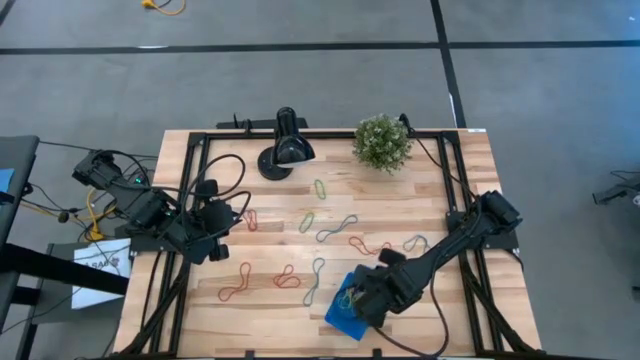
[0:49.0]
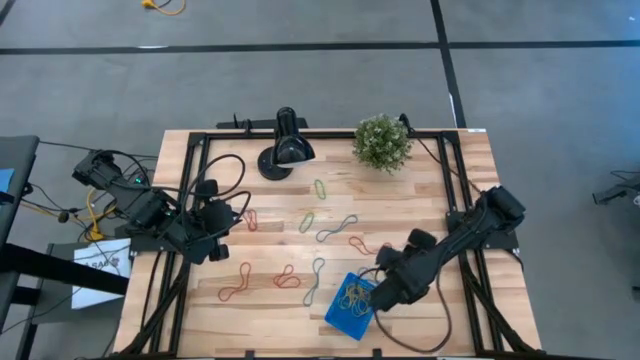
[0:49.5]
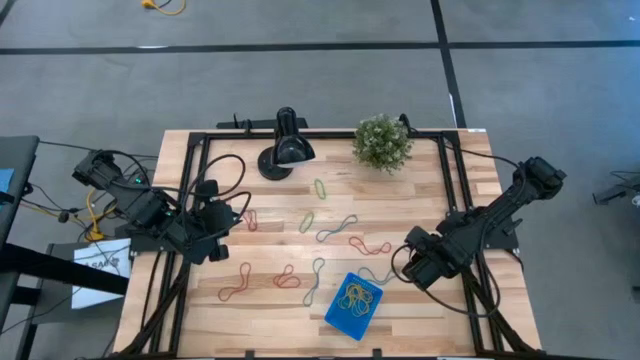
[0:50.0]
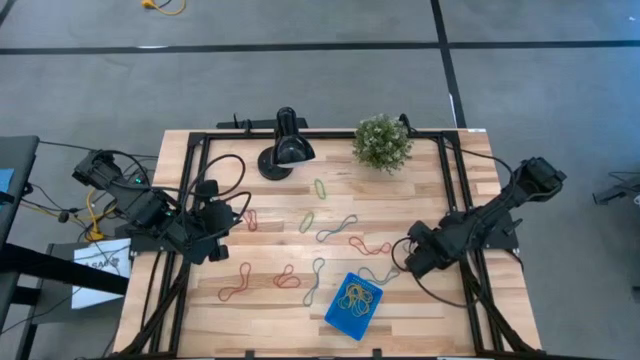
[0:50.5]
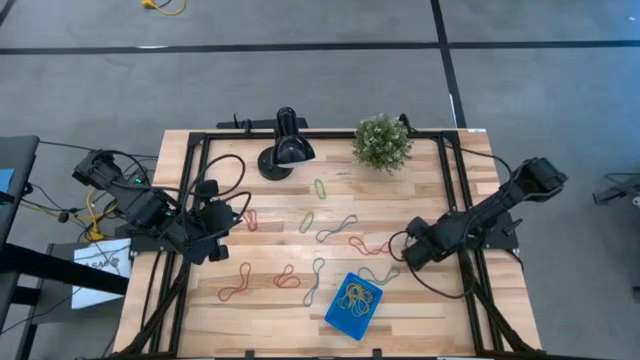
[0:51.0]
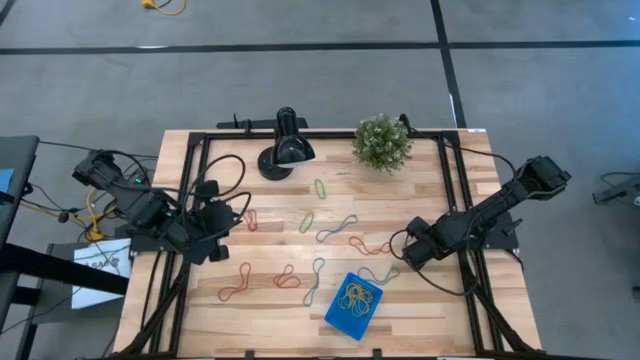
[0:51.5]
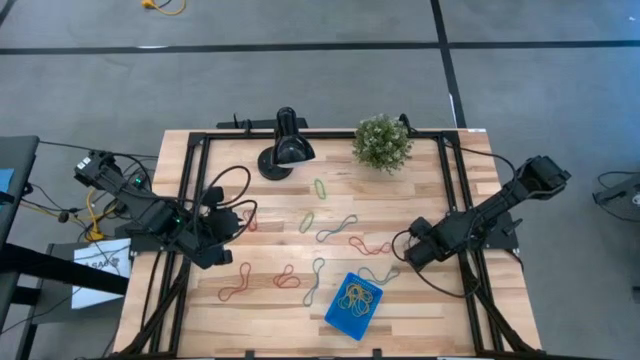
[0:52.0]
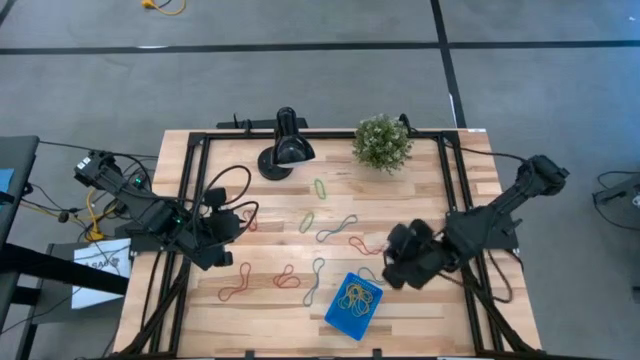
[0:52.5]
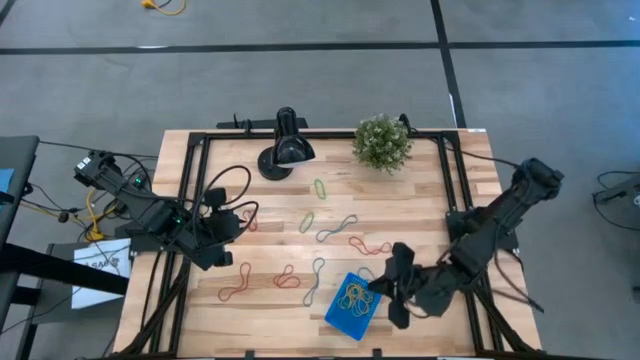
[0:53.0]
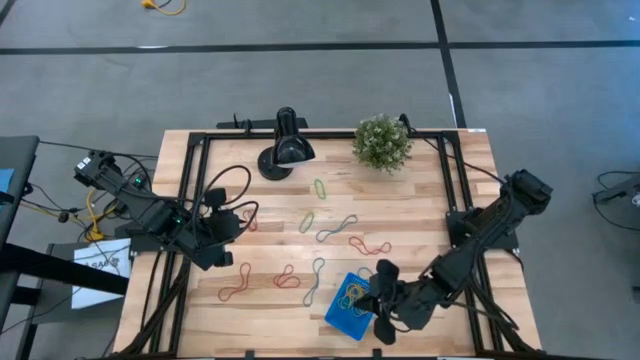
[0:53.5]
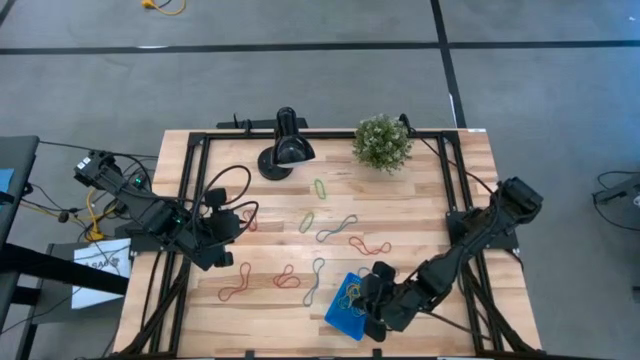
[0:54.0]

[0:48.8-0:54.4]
Task: Pick and place items into bin
Put the blue rubber band into the blue bin

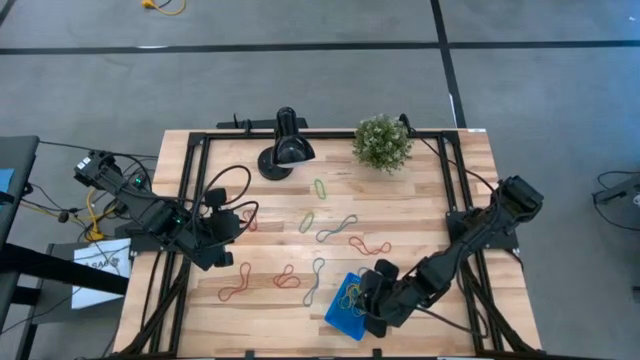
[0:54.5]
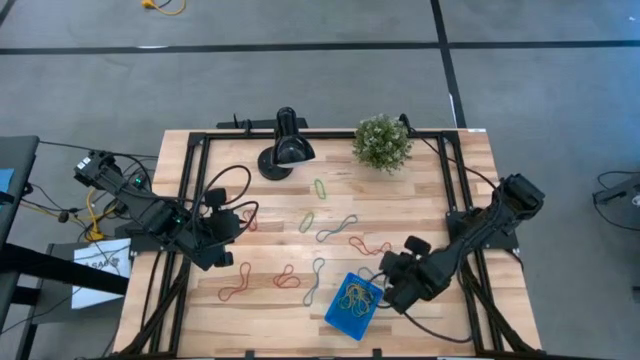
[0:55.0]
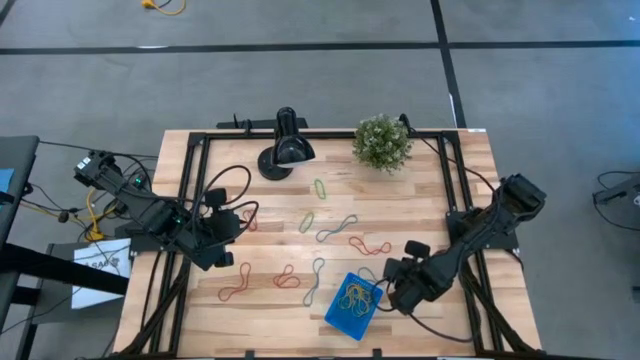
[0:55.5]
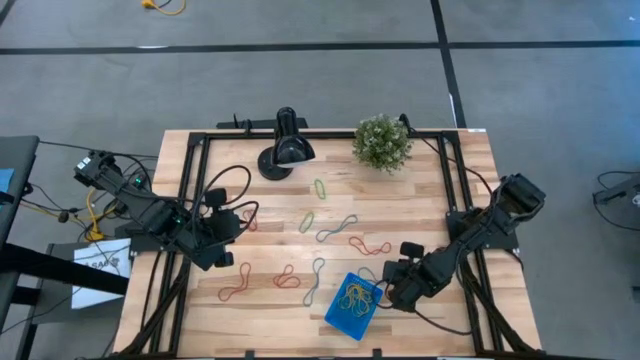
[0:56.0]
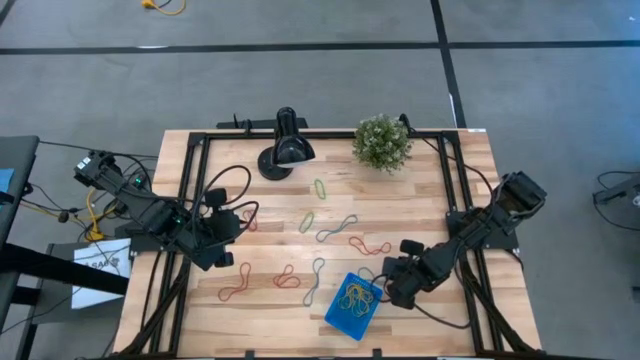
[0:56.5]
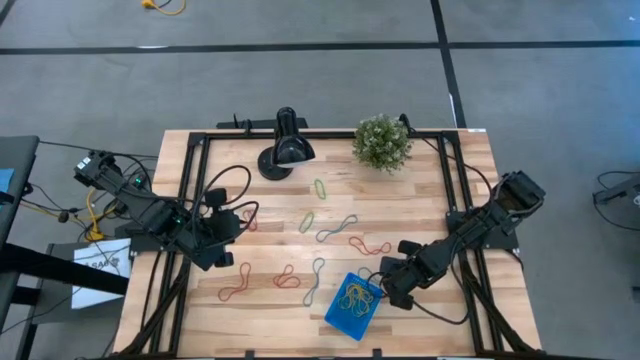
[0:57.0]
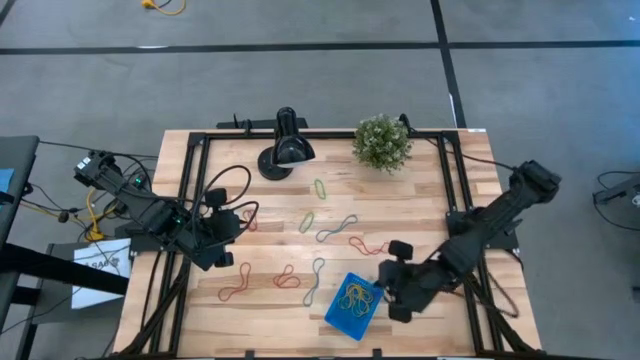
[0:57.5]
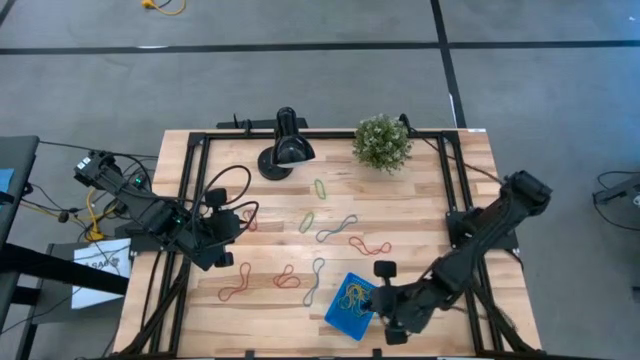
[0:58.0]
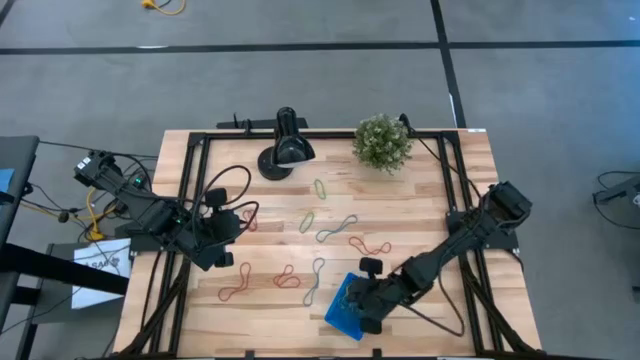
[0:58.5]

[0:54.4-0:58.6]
Put the blue rubber band into the blue bin

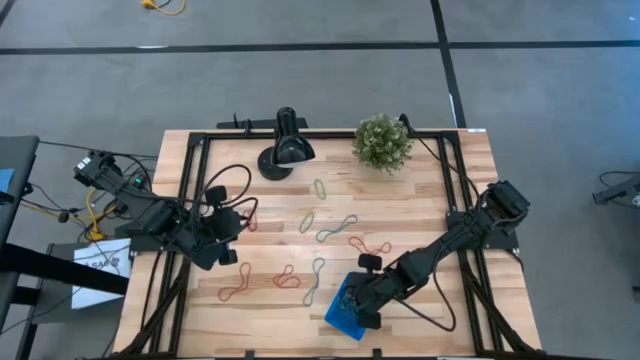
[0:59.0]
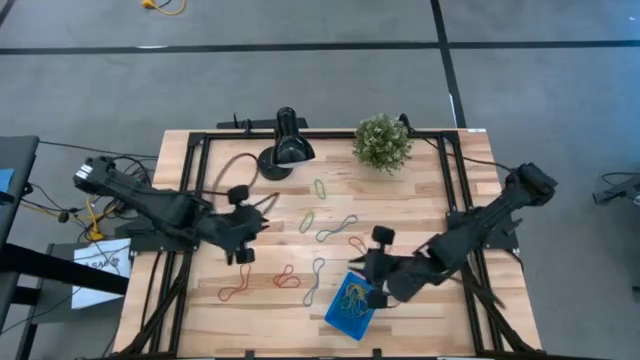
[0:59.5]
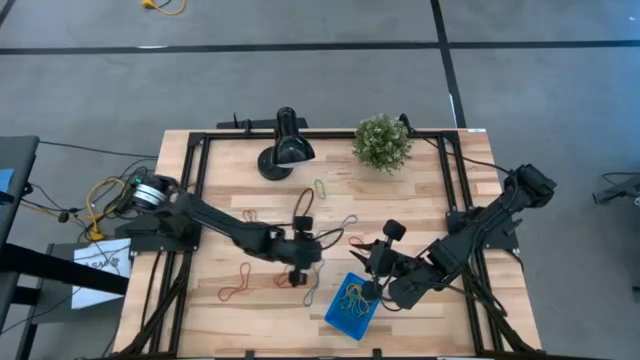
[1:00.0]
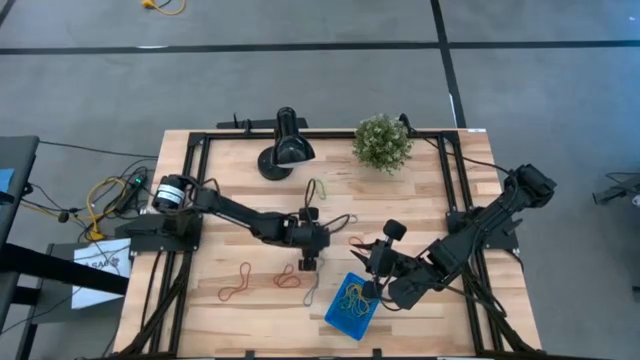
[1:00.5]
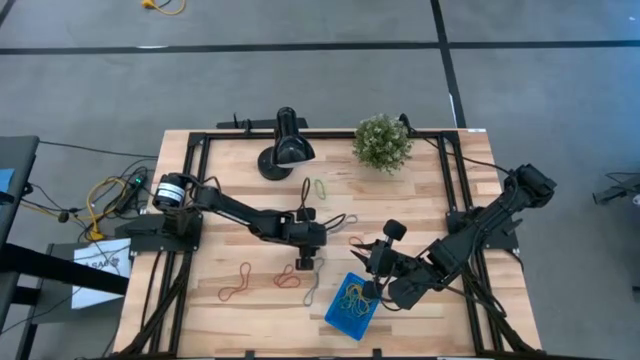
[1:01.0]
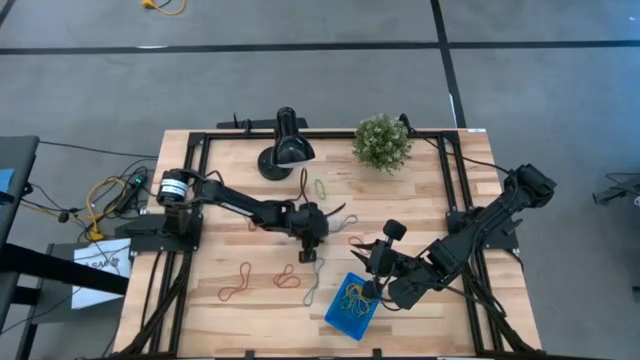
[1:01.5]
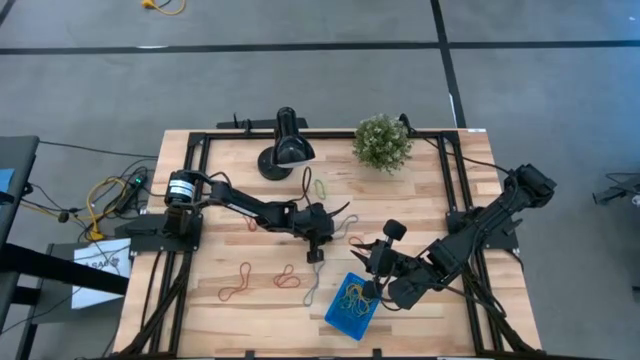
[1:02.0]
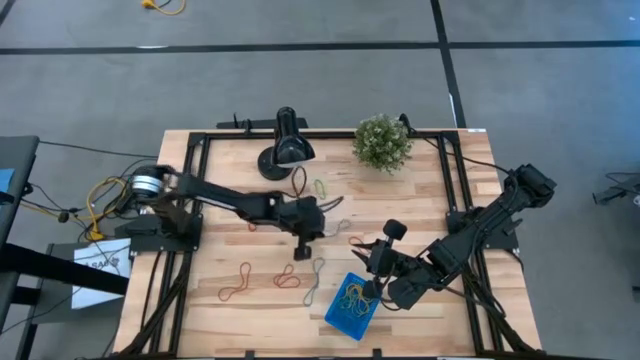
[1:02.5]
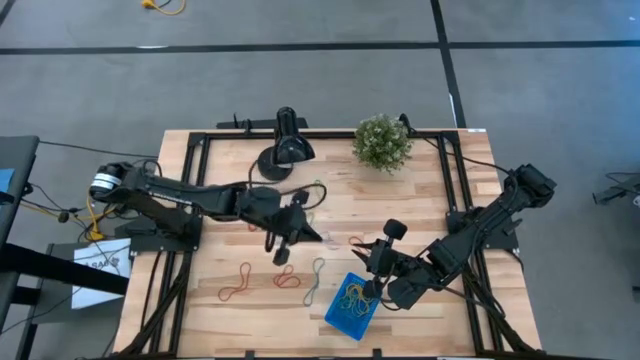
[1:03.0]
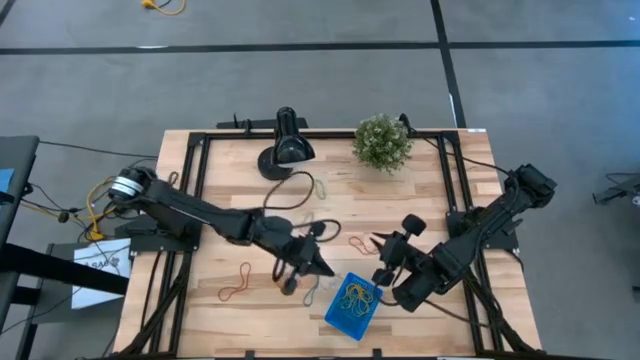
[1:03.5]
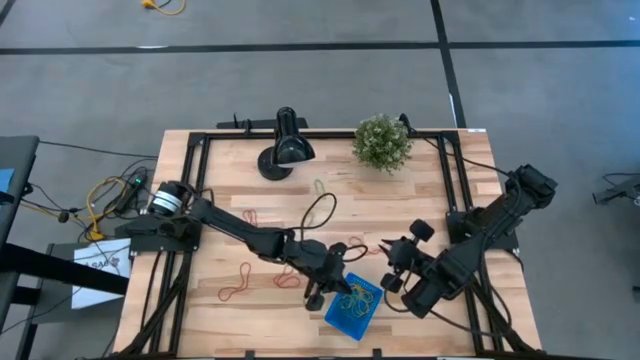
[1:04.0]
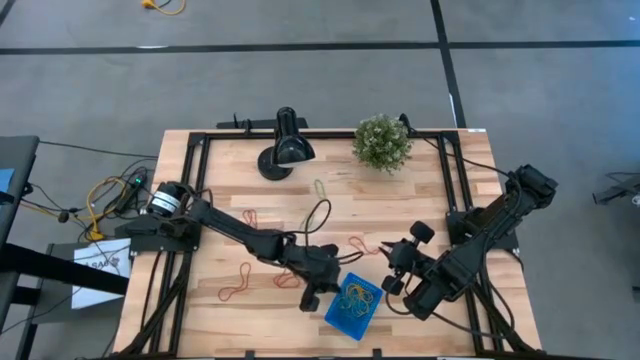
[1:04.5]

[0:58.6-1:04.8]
Put the blue rubber band into the blue bin

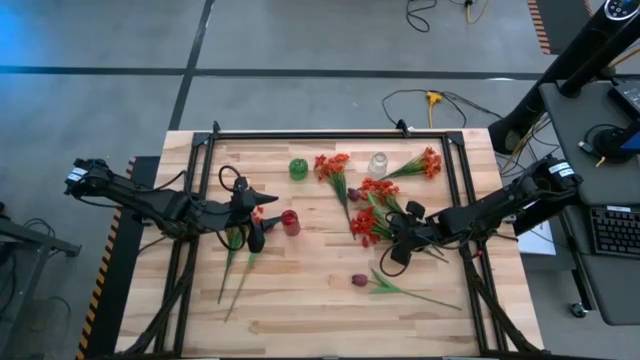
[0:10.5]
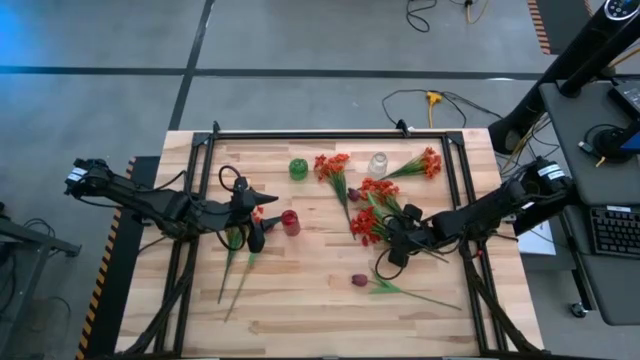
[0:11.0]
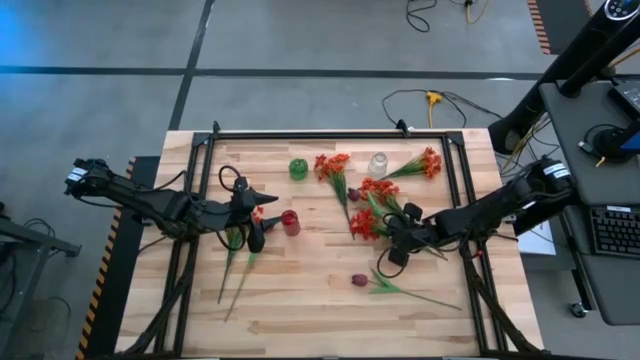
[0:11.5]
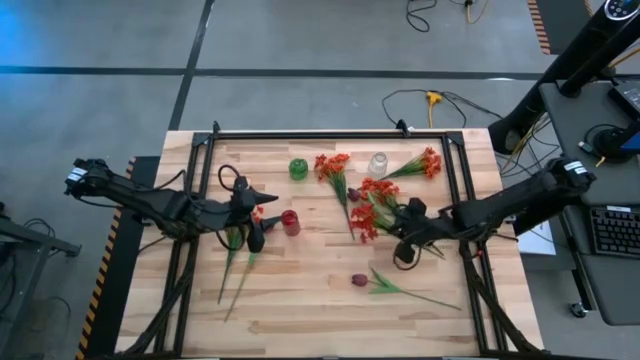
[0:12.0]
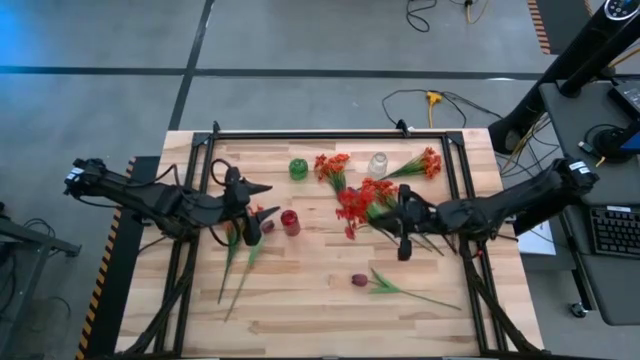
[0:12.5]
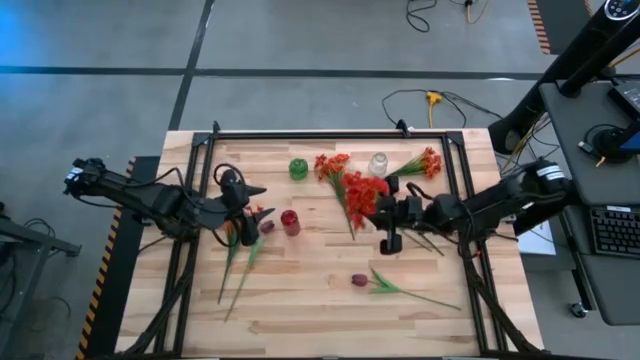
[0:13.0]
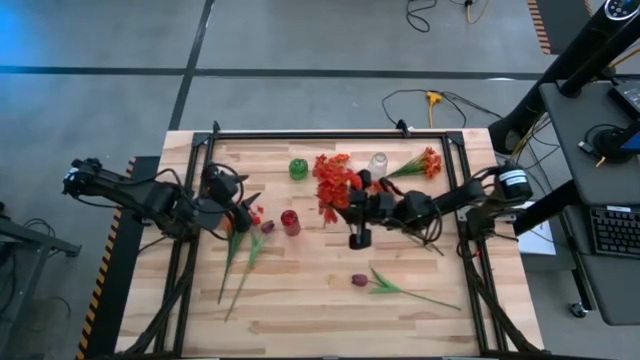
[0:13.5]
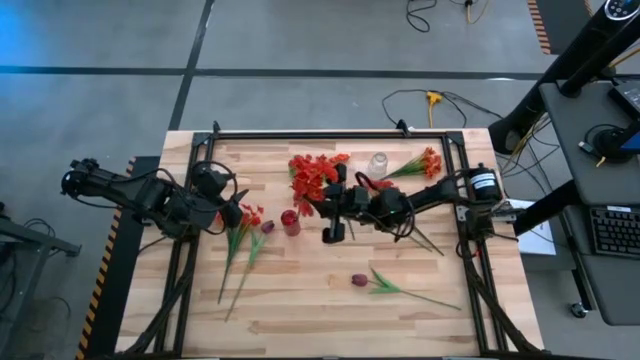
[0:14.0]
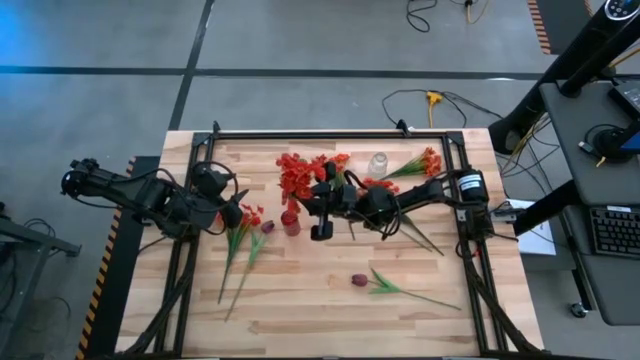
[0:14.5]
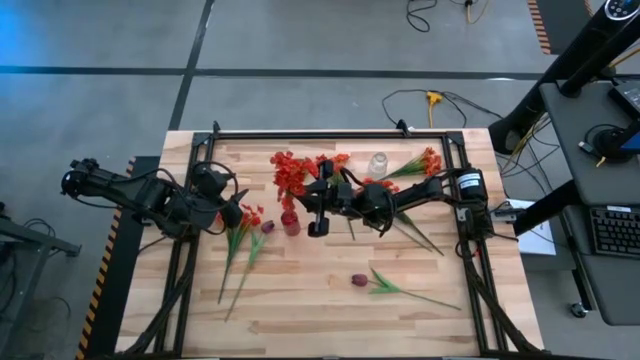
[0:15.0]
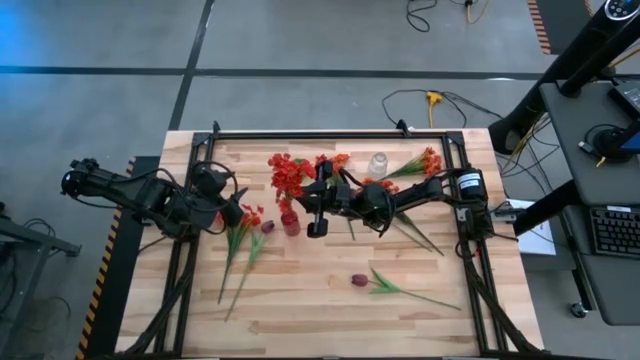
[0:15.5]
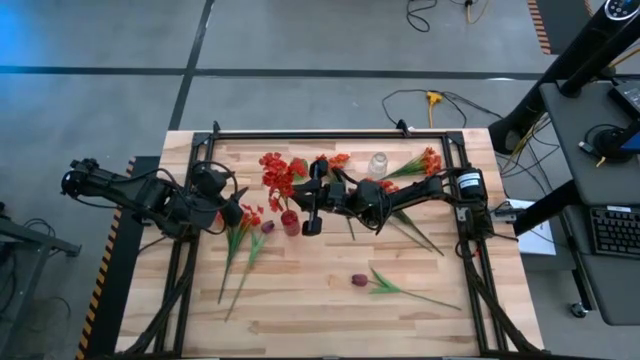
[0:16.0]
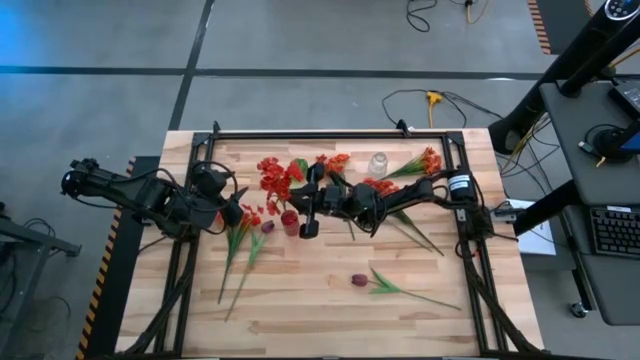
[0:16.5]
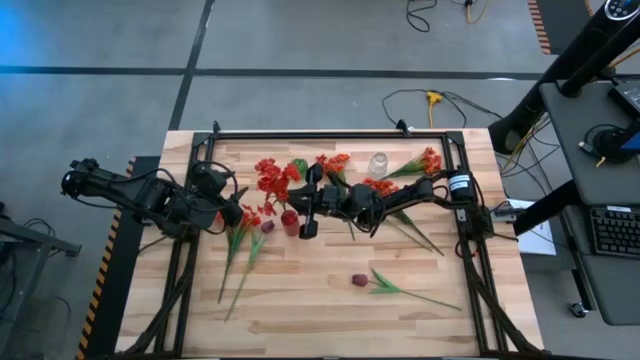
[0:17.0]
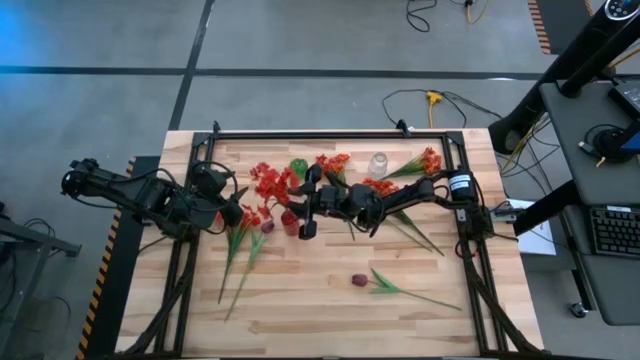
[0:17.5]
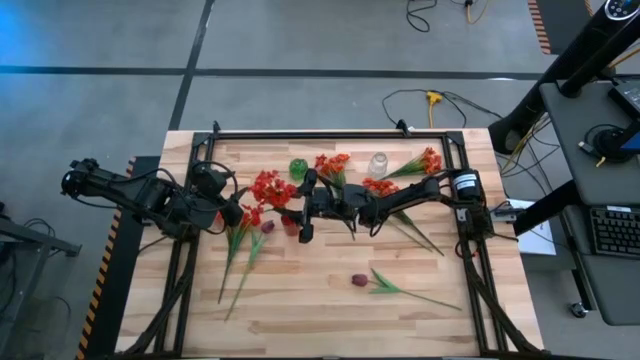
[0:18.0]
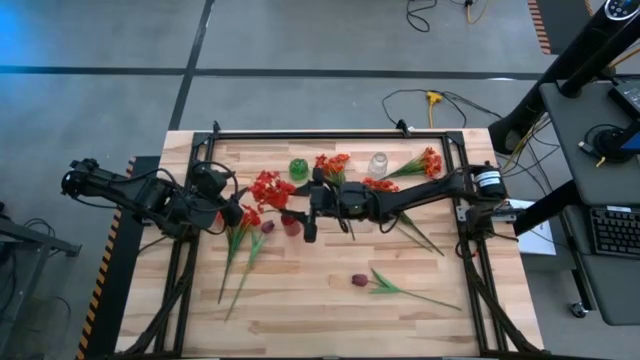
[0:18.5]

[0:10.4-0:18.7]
Task: Sort flowers into vase by color
Put the right red flowers into the red vase
